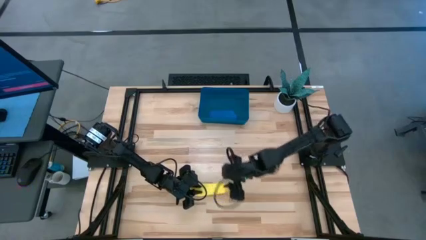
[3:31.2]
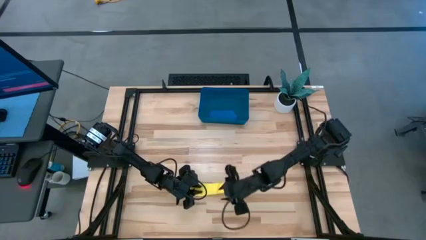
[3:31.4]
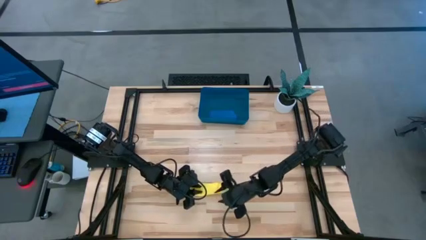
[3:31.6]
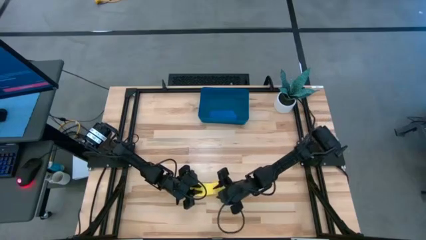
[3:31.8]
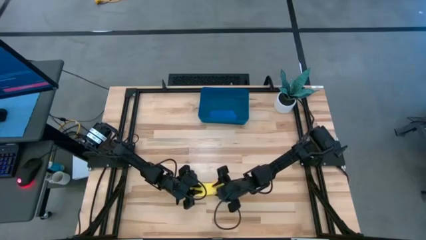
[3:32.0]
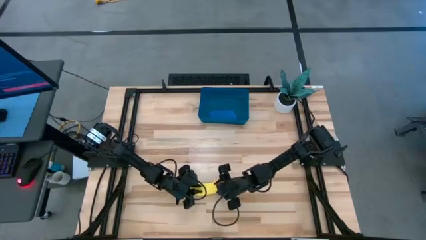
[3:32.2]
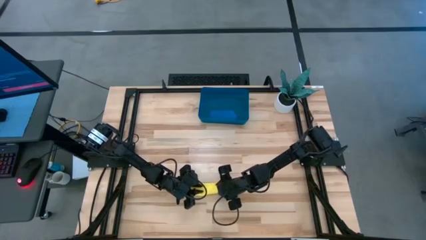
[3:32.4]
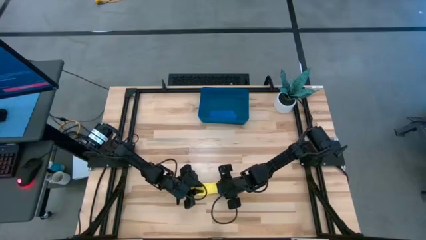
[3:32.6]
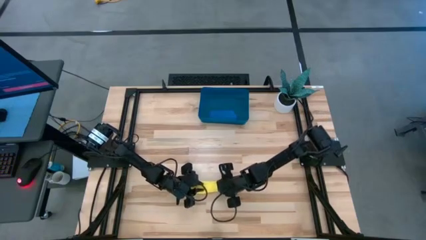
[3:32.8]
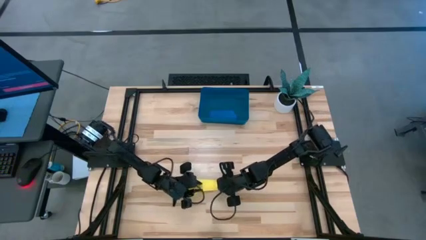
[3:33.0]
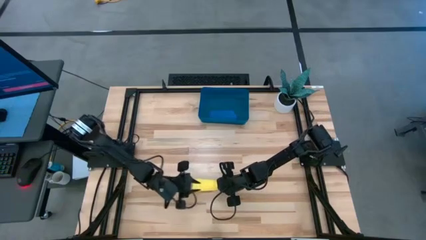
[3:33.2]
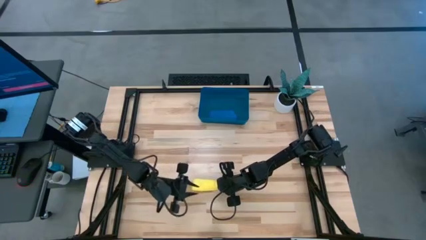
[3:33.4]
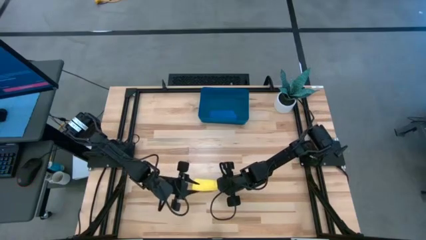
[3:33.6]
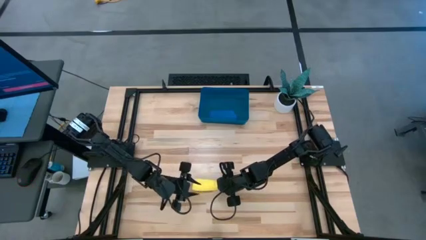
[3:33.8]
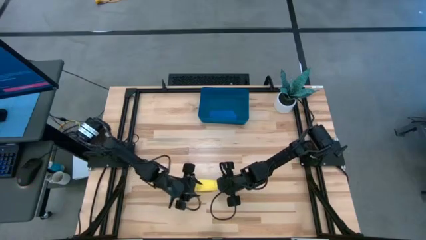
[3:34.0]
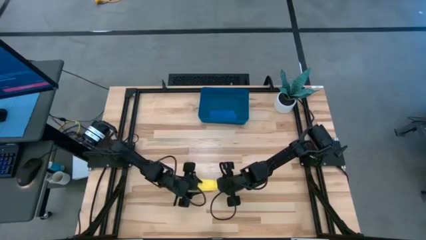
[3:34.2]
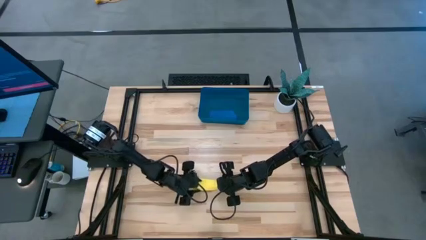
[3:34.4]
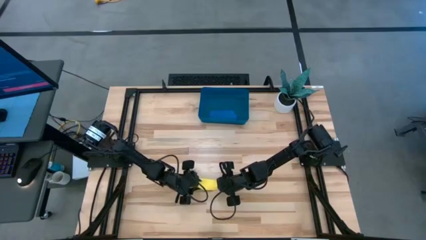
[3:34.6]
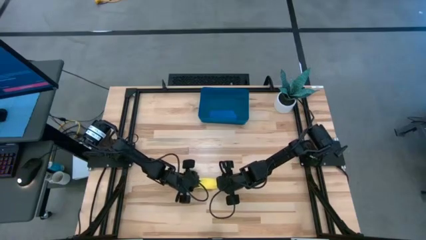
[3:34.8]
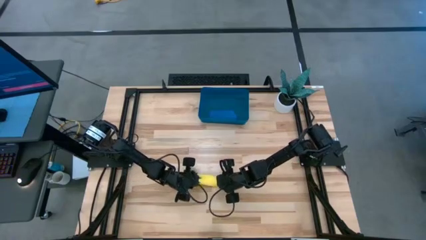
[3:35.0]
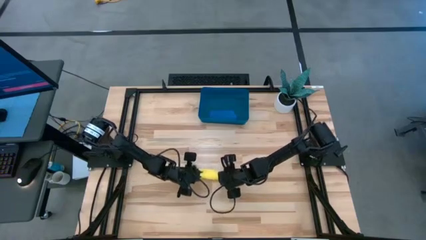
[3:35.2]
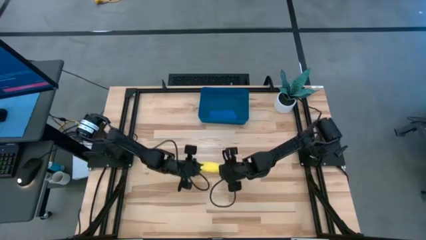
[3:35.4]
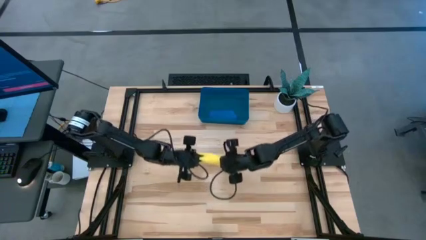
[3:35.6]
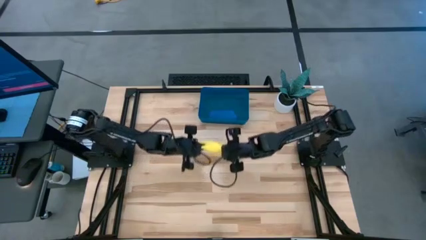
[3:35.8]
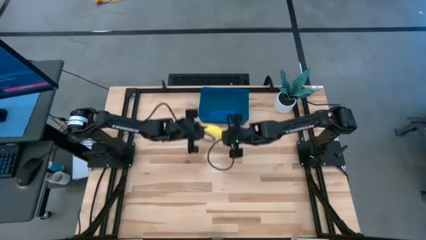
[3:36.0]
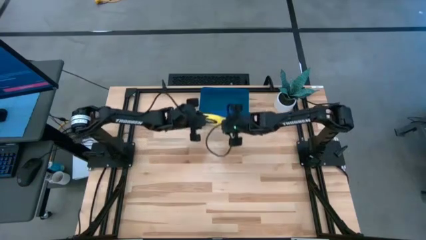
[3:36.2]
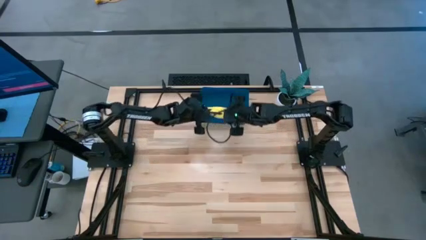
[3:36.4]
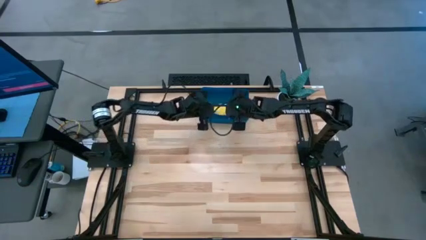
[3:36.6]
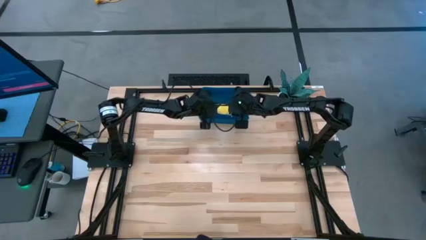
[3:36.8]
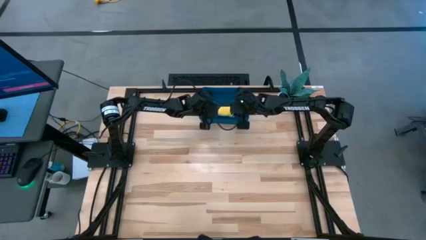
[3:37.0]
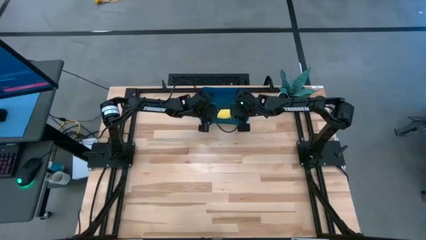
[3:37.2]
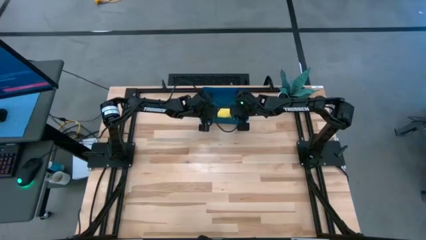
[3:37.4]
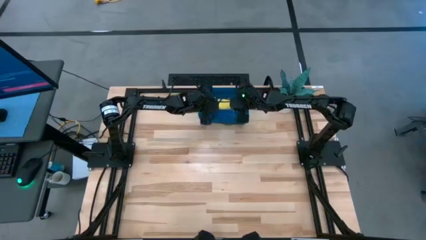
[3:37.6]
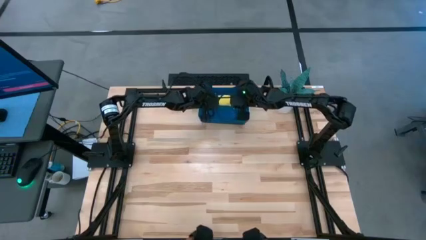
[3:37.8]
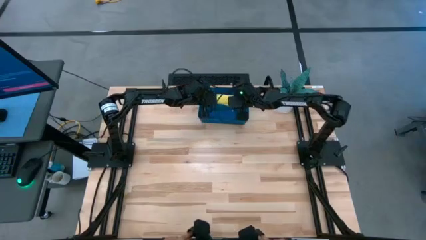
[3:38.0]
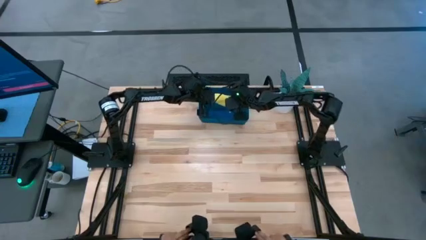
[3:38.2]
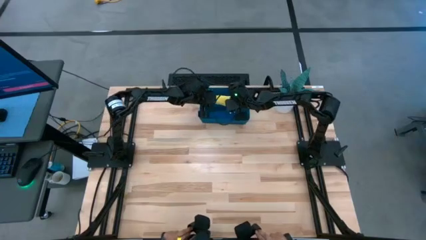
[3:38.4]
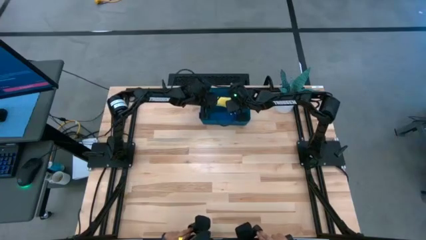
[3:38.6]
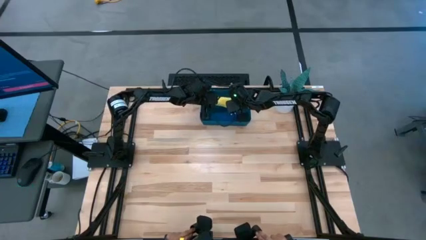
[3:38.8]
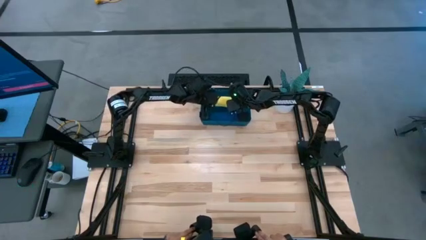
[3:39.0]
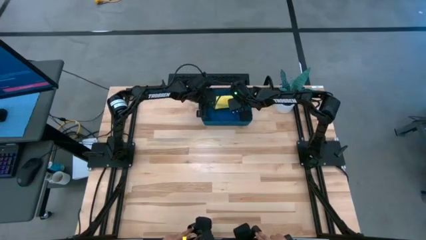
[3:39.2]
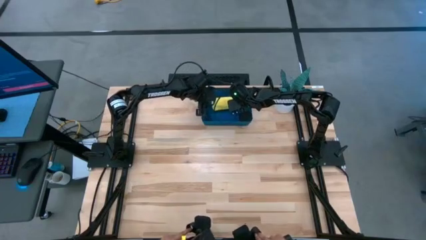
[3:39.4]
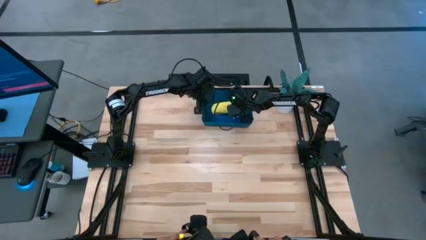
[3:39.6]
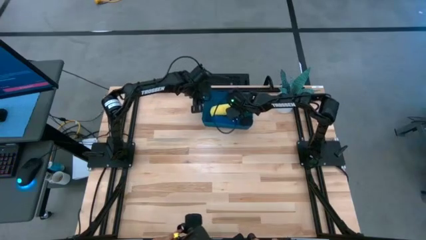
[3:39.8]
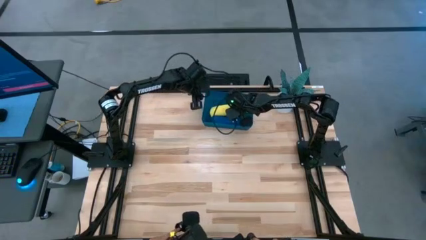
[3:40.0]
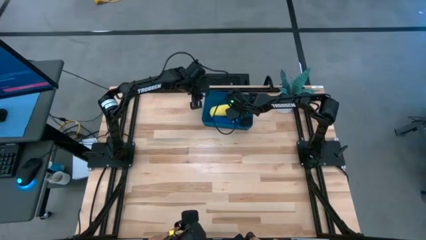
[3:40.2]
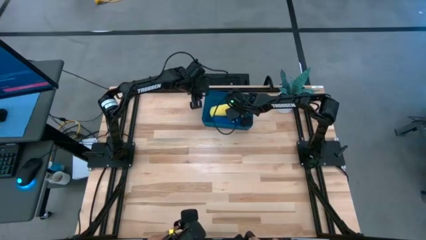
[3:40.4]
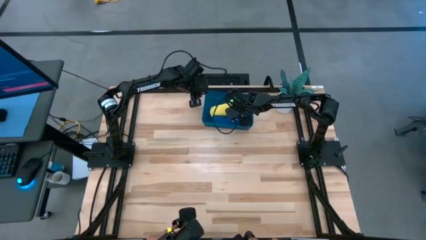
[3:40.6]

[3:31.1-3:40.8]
Task: Roll microfiber towels into tight, uniform cylinder then place into a basket
Put the yellow rolled microfiber cloth into the blue bin

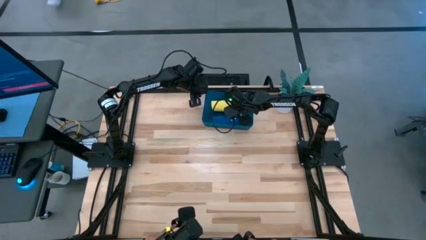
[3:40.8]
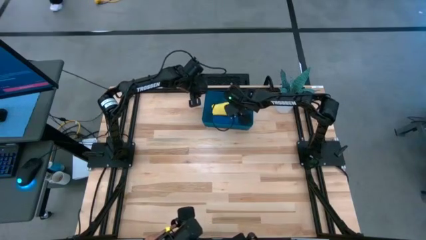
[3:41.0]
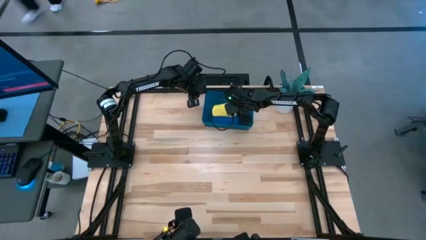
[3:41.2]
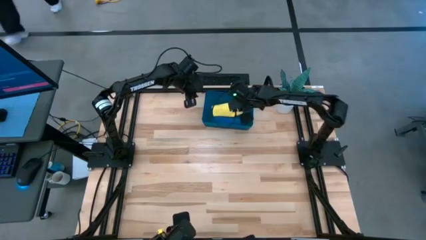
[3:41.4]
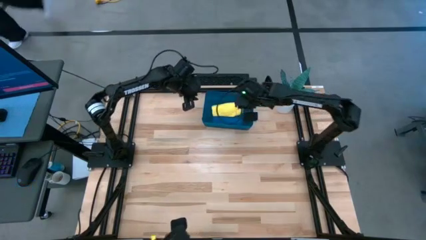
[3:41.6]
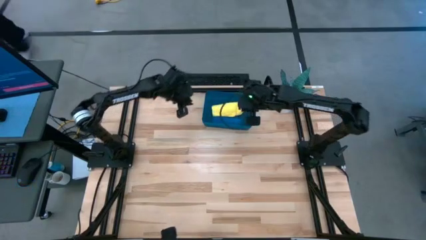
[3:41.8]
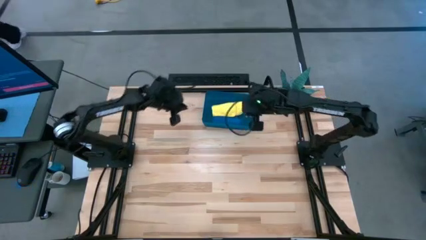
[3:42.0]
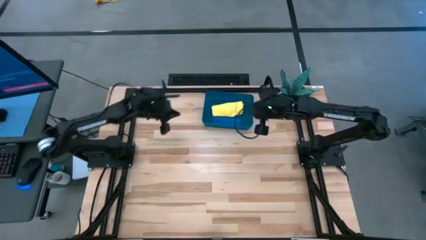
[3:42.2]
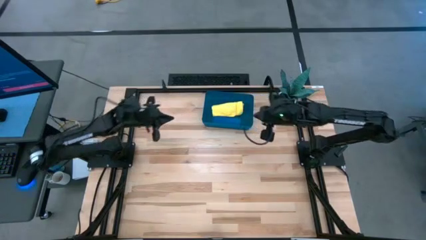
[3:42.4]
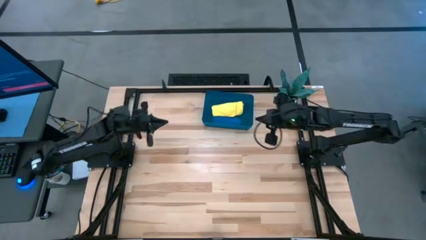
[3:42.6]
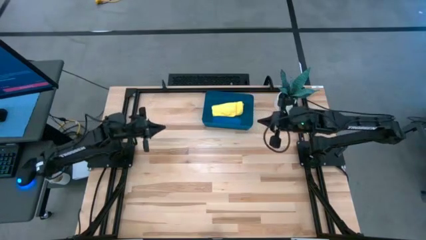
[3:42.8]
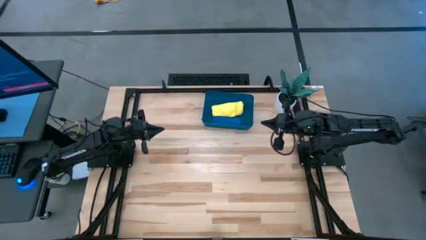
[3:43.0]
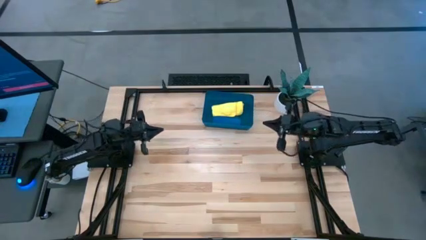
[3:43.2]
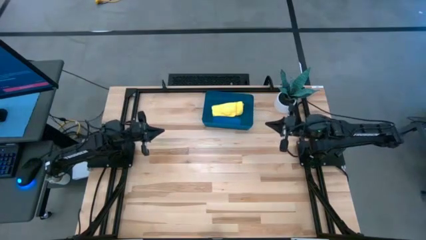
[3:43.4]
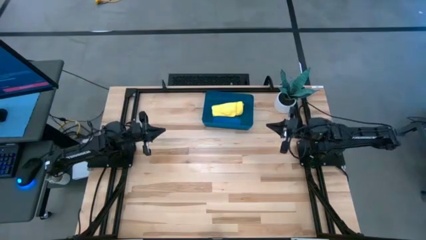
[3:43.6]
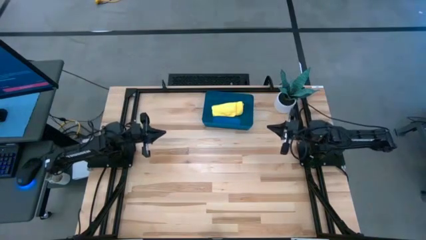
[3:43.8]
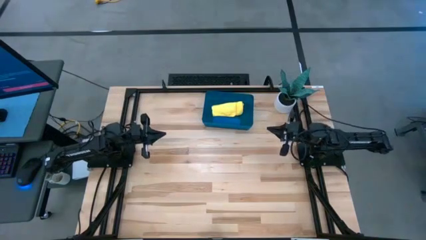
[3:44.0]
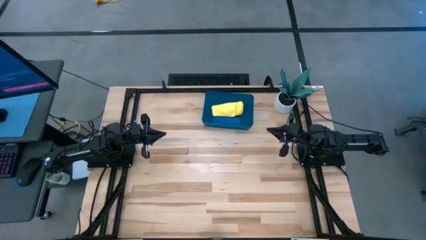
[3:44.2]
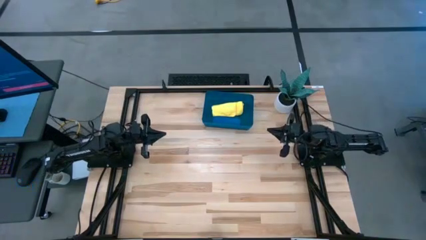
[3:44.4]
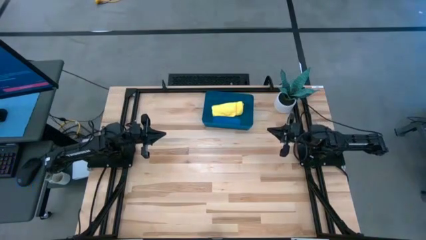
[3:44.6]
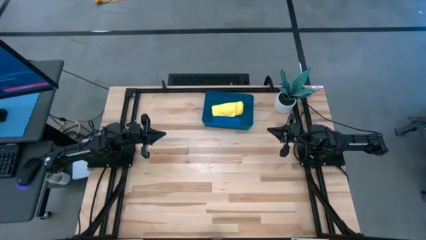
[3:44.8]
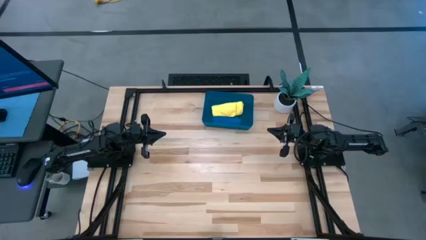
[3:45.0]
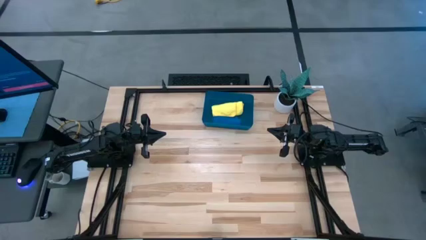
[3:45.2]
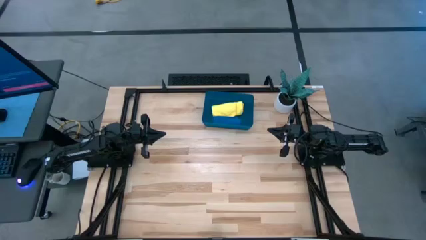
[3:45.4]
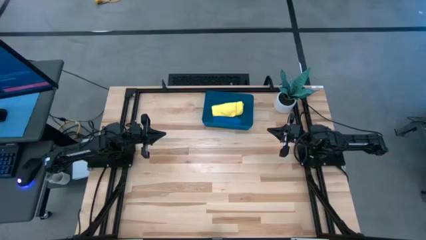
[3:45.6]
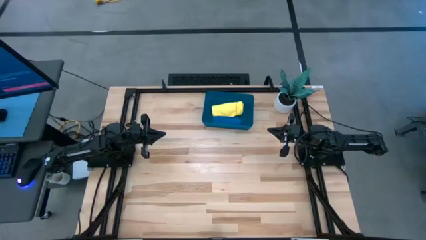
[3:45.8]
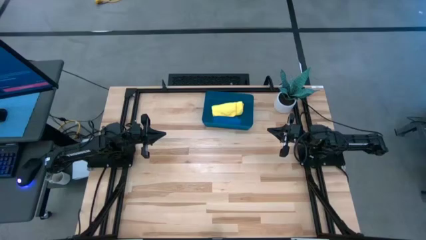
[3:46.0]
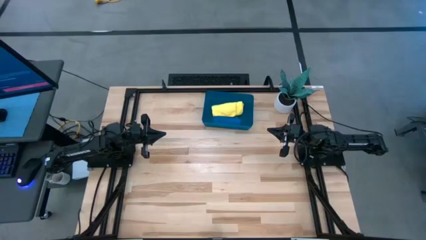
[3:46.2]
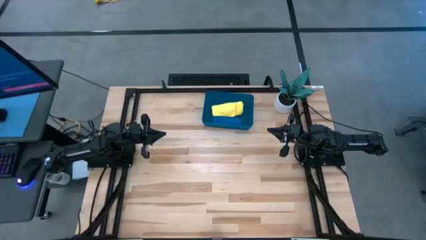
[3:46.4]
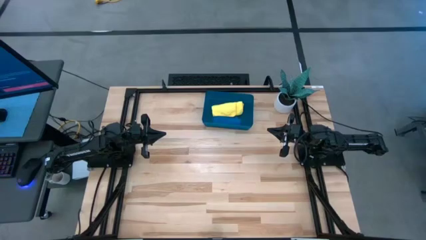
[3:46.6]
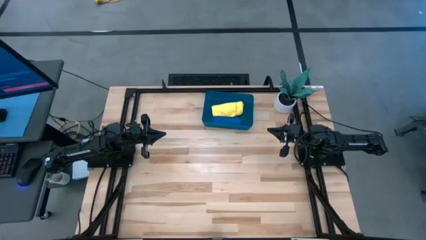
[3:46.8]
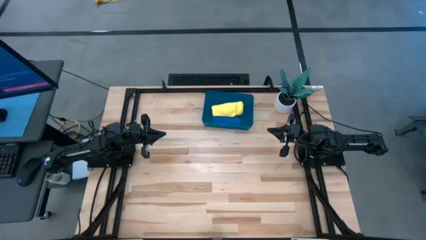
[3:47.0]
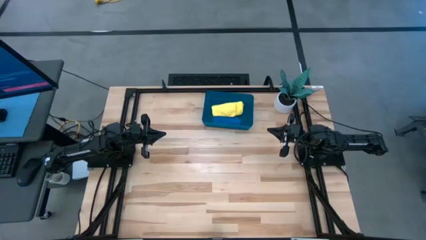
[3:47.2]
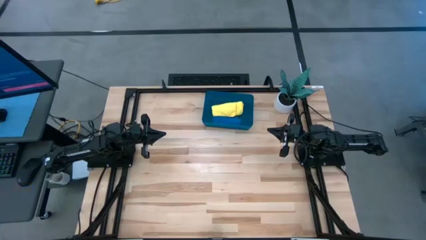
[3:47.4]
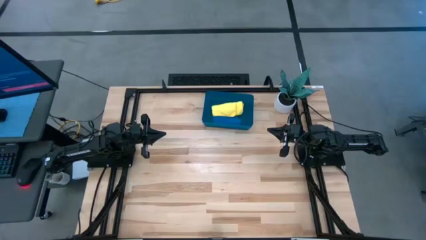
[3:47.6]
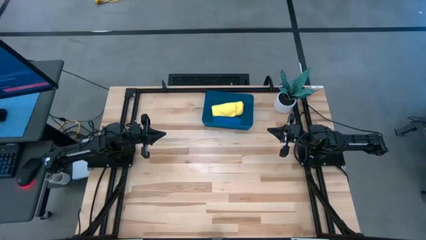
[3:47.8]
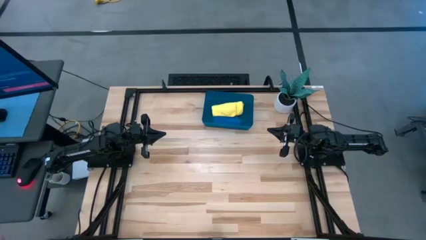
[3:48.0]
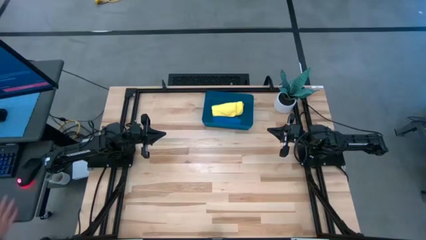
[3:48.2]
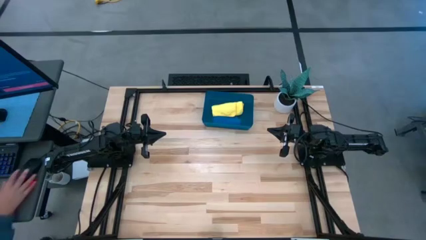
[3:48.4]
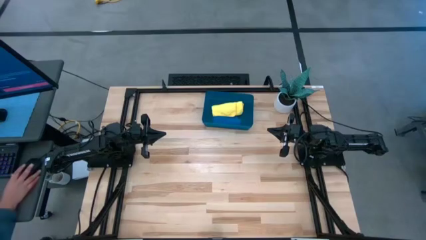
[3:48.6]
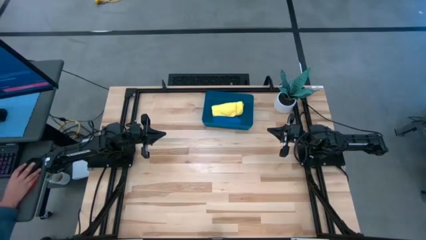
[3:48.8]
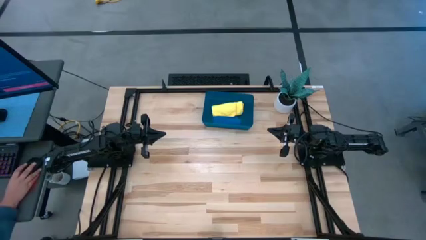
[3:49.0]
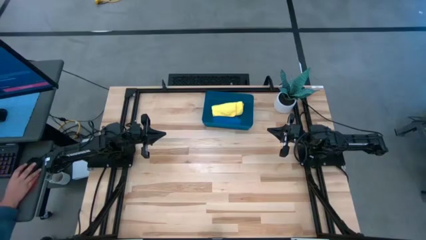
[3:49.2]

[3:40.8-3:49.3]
Return to Home Position
